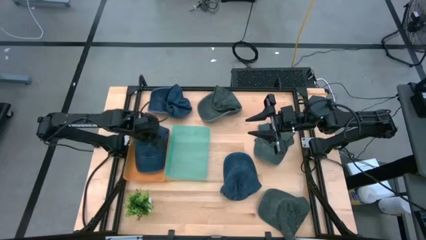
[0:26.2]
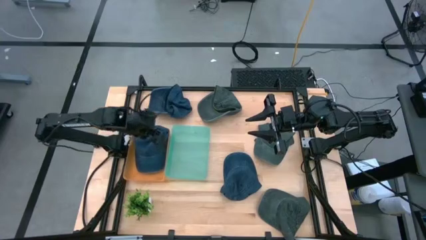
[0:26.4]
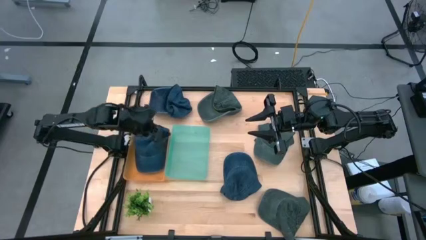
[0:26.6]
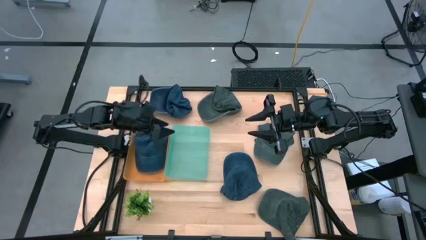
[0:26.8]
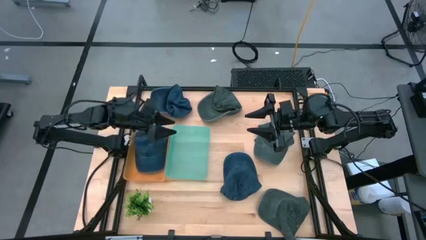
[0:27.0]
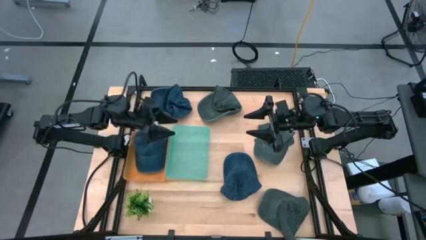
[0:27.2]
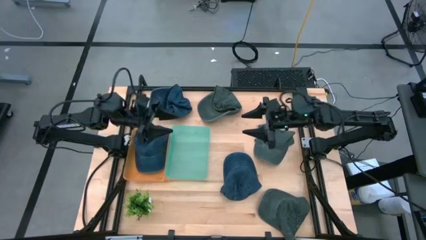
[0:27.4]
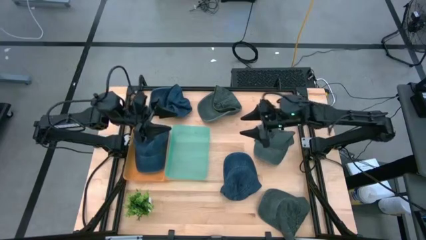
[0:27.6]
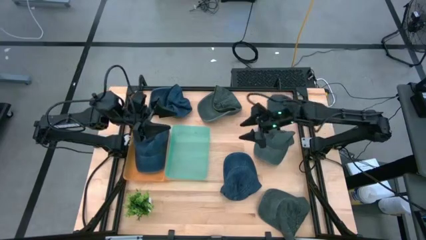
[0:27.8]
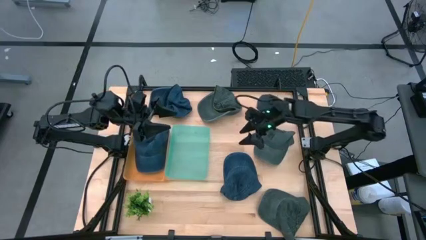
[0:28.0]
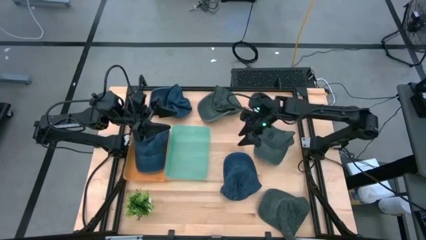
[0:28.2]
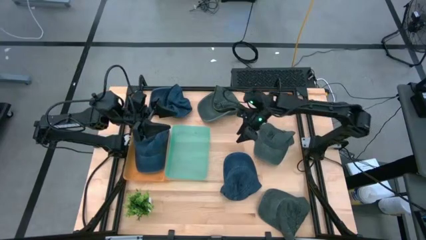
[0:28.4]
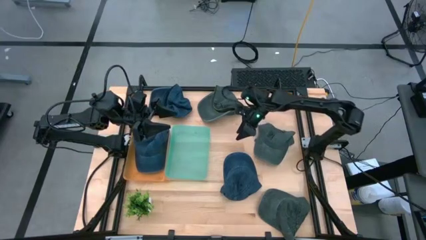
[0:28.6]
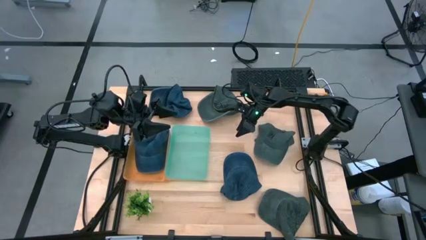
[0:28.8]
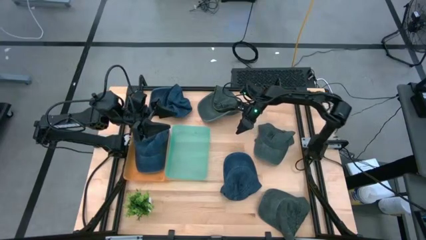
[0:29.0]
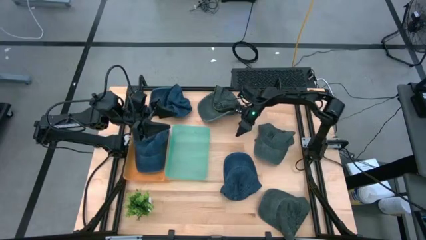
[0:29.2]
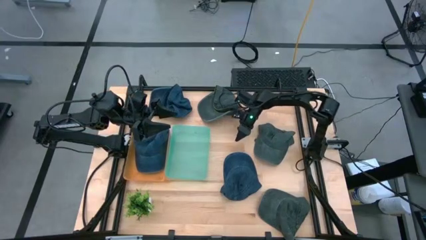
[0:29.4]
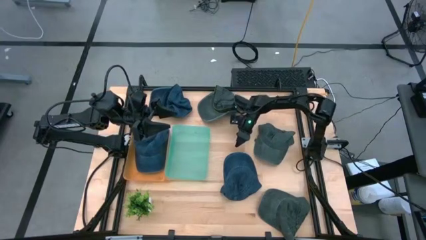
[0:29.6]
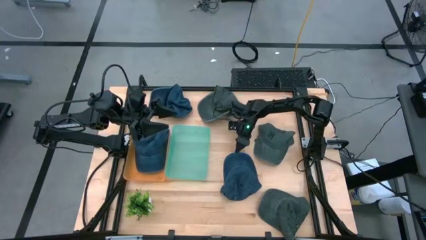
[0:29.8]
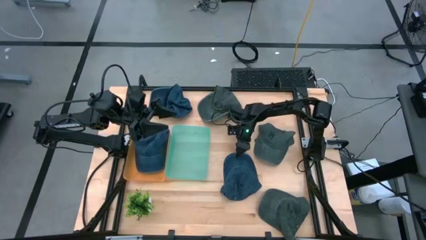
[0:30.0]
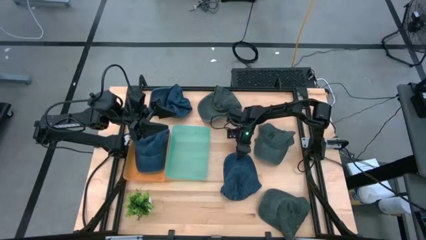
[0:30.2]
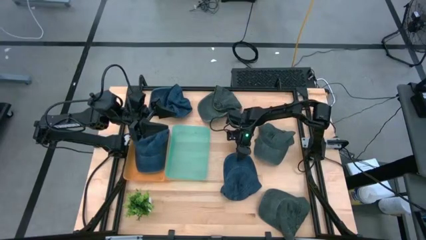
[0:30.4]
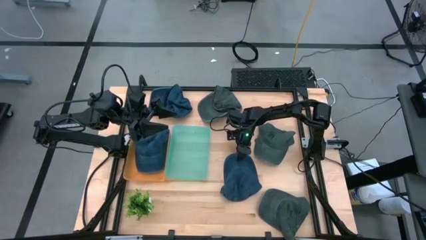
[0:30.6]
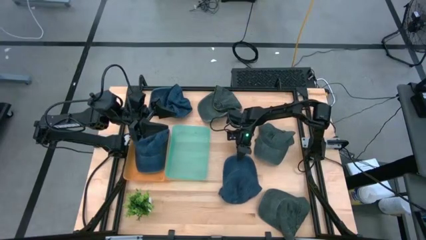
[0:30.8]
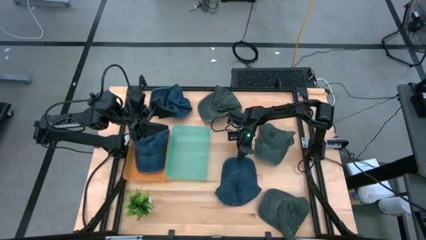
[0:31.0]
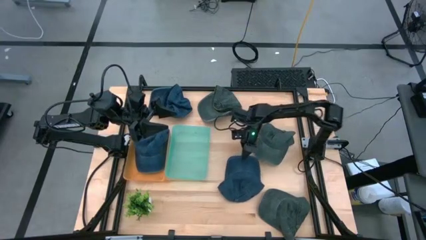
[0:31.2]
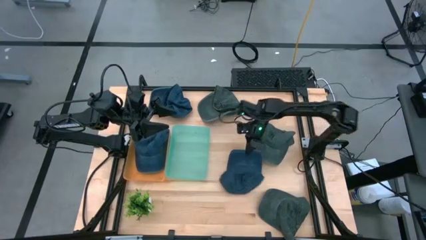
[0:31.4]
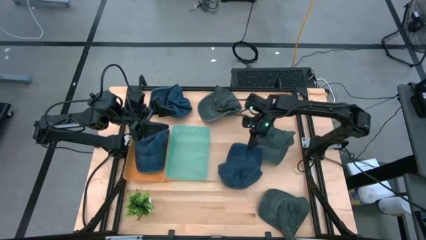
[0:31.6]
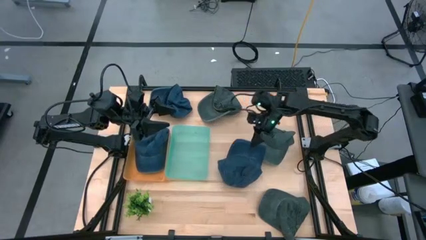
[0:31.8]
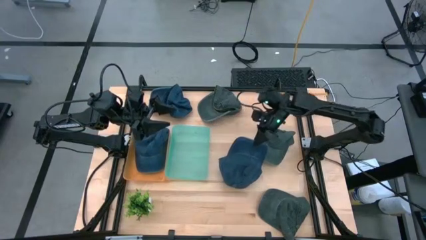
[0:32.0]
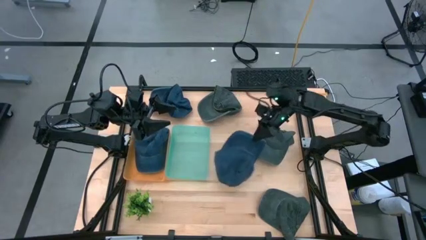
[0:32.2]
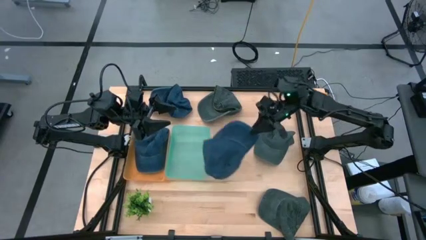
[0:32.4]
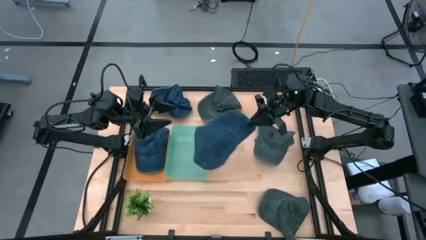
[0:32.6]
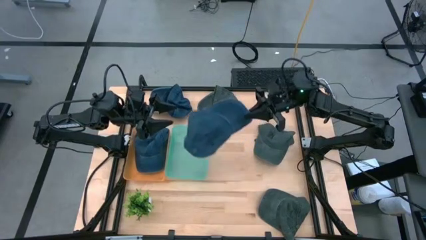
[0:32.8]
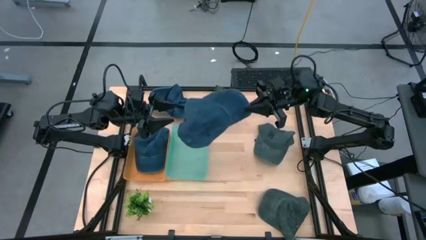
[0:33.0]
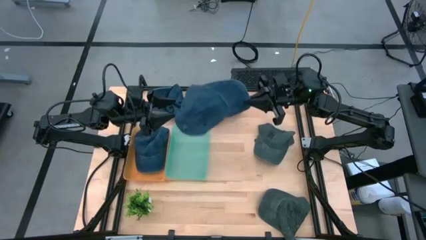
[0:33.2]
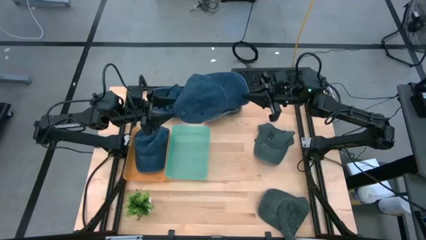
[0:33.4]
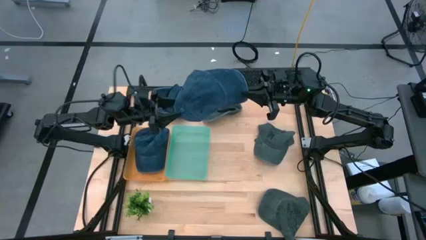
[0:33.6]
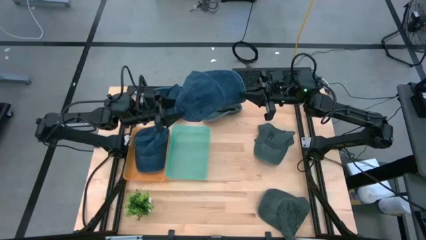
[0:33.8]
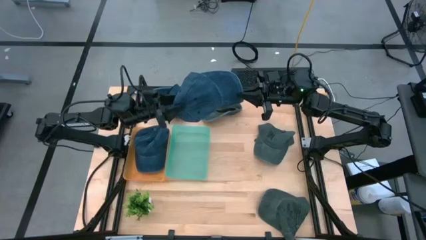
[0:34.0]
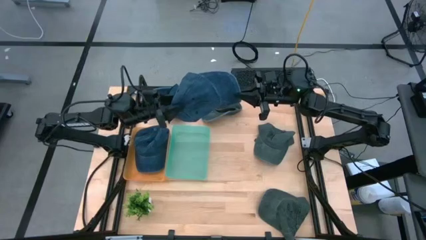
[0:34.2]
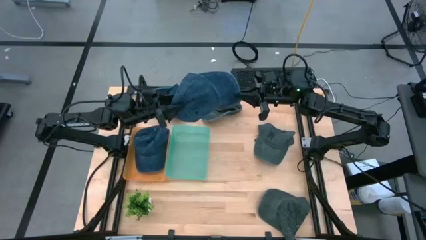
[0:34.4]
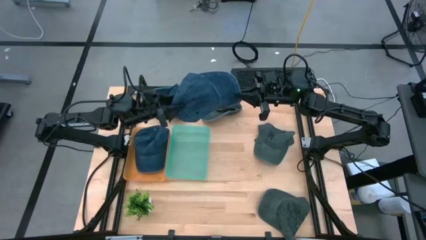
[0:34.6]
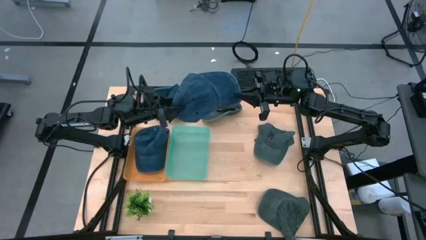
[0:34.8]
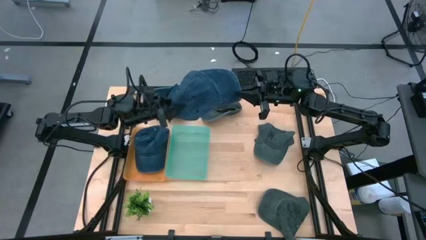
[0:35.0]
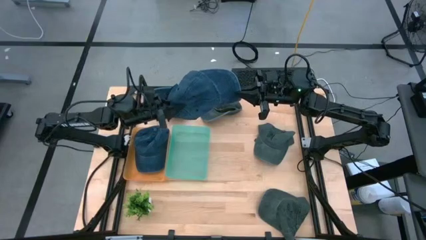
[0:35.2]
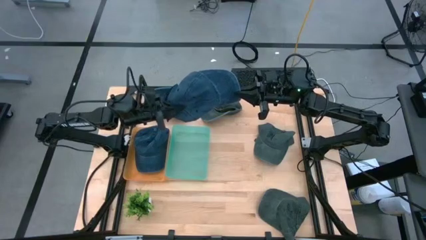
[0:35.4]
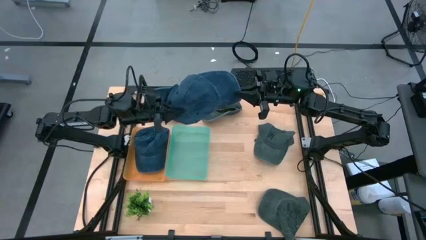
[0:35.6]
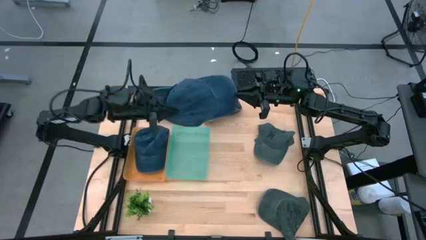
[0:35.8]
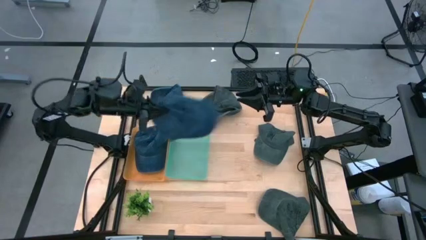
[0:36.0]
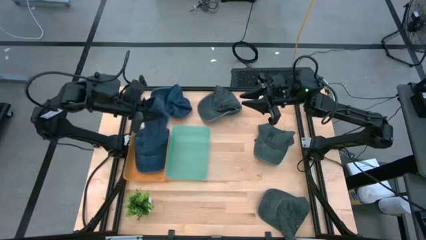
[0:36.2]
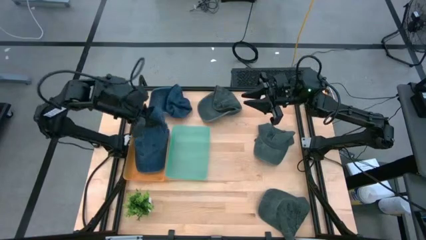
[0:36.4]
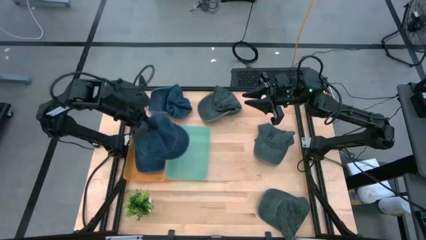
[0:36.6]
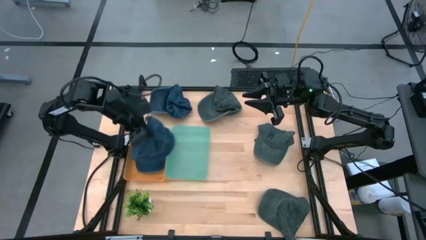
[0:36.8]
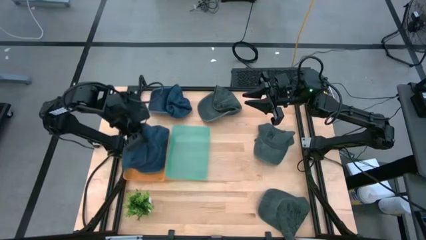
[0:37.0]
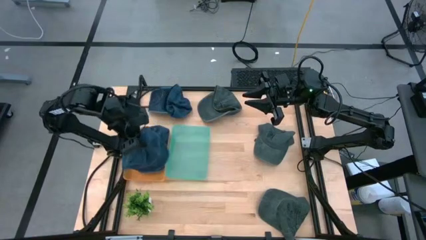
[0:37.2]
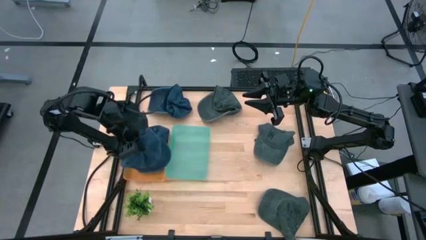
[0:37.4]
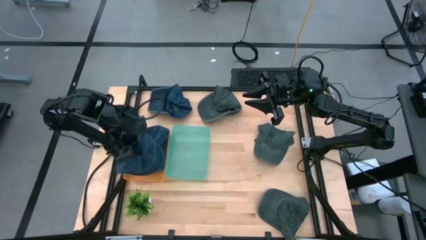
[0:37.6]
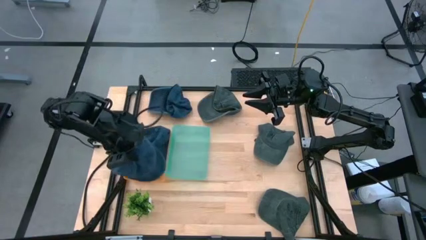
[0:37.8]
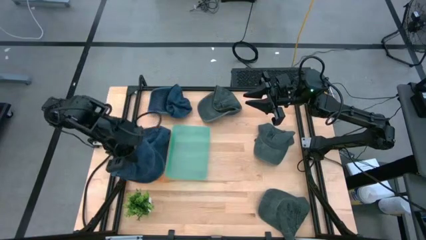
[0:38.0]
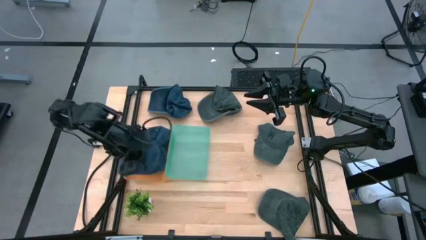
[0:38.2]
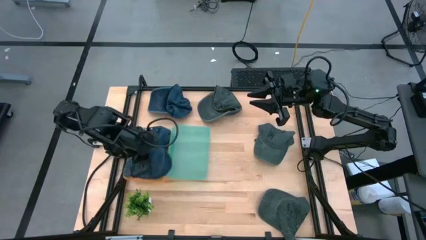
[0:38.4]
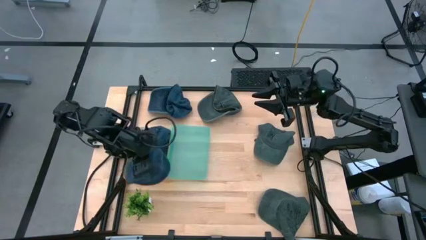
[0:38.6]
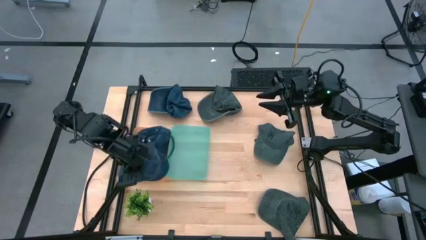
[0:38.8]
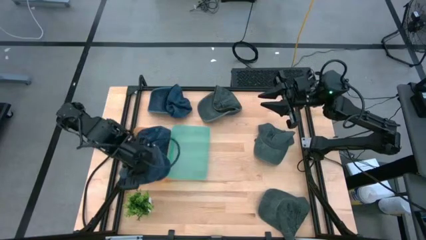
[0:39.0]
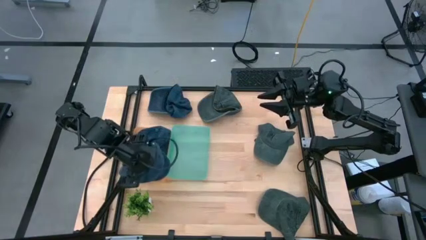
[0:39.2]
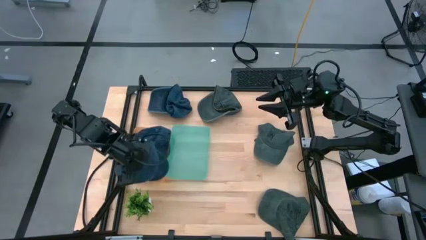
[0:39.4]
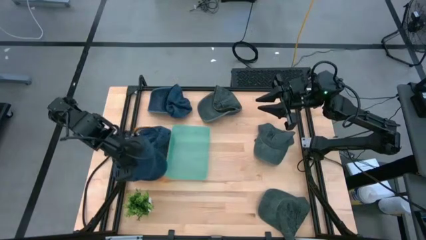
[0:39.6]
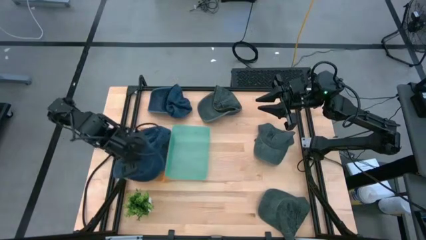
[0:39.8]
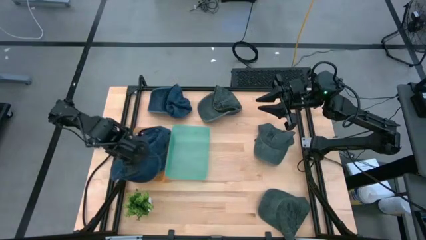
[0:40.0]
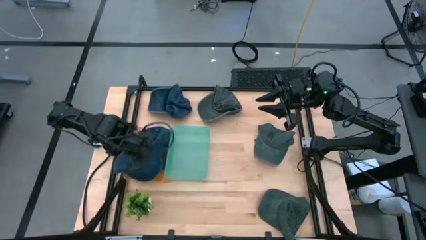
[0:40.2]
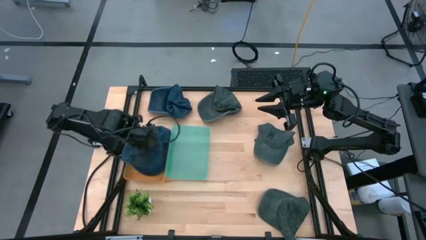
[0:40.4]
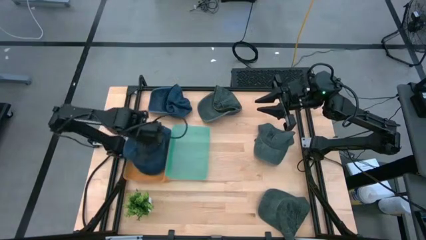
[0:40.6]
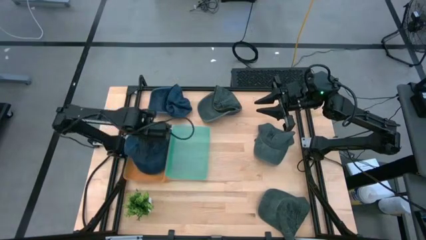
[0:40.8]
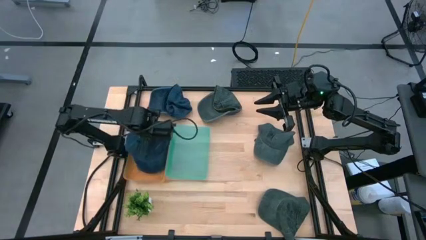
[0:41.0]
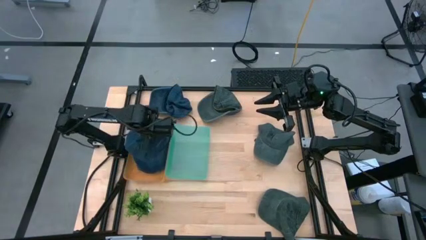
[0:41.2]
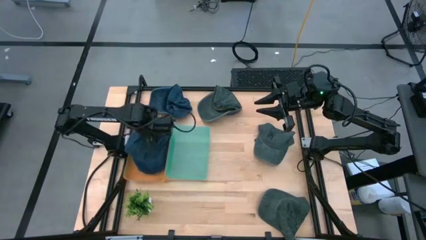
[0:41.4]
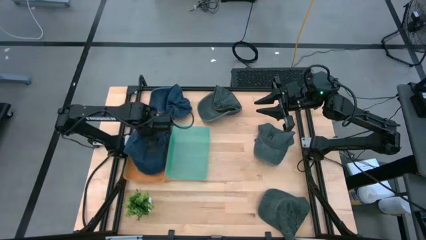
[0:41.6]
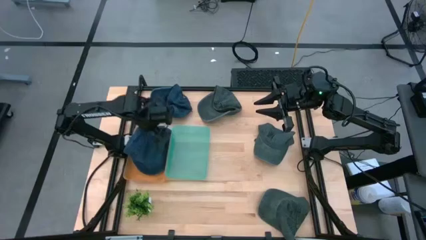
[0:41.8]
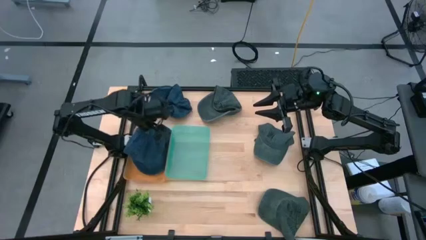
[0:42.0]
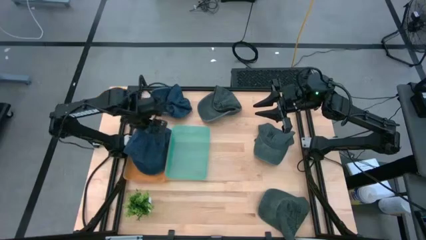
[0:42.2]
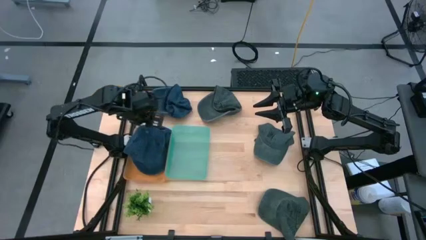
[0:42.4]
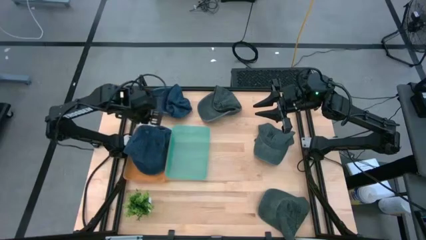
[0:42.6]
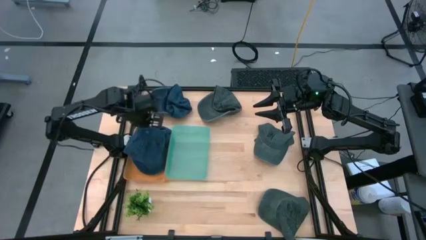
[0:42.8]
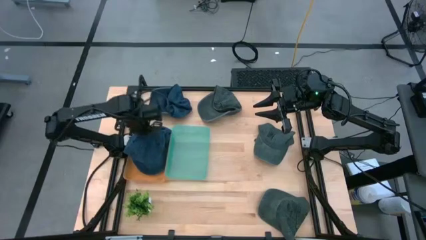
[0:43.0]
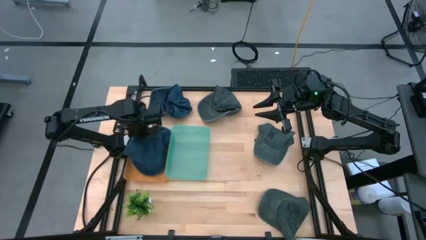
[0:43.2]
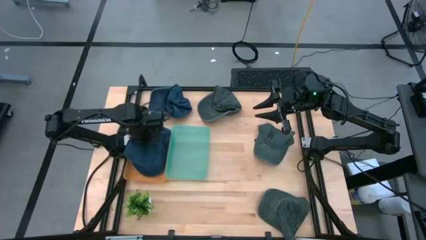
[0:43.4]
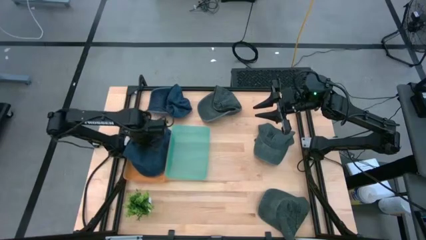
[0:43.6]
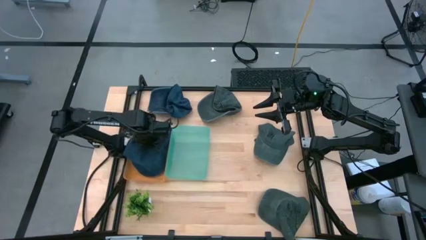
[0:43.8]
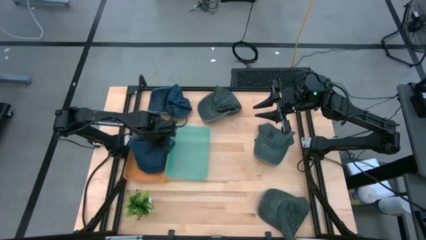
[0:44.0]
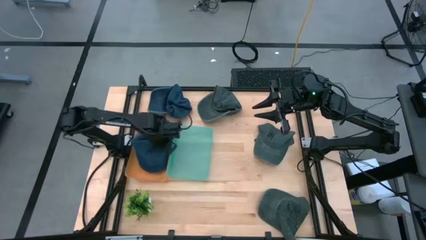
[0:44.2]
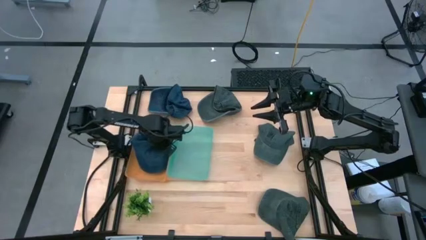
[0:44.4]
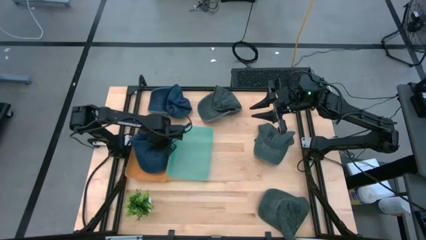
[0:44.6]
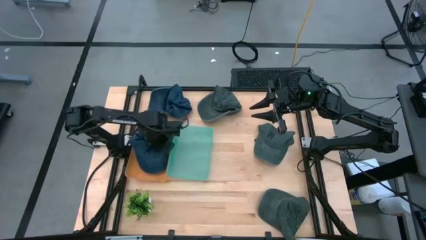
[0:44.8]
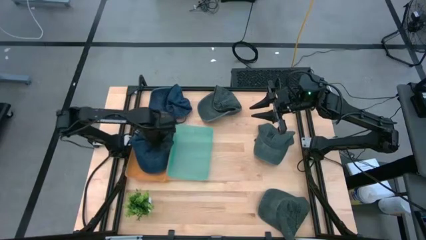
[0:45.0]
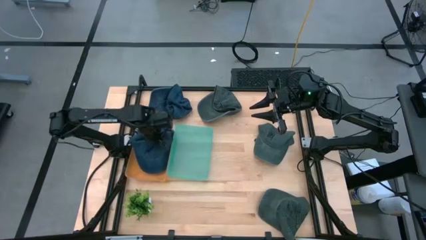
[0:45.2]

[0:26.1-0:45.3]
Task: Pick & Place hat
Put the bottom blue cap into the orange bin
